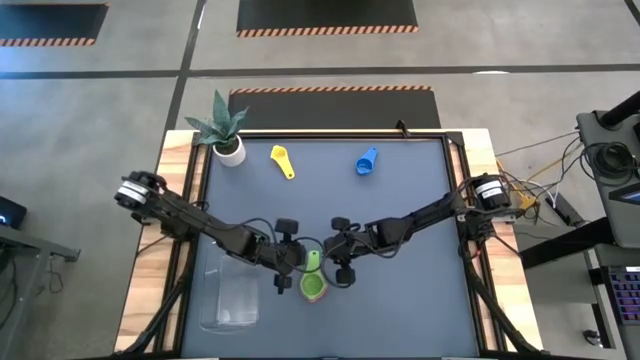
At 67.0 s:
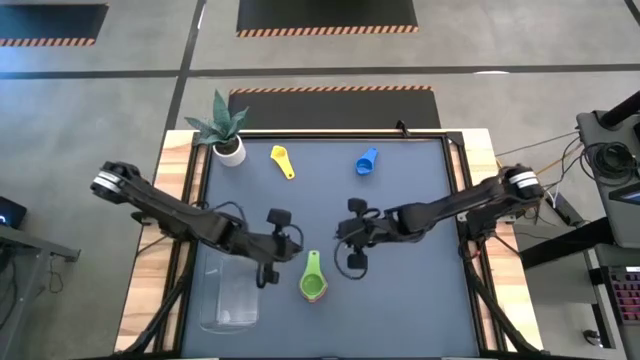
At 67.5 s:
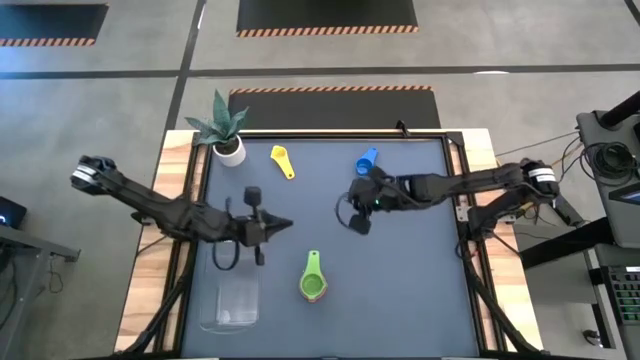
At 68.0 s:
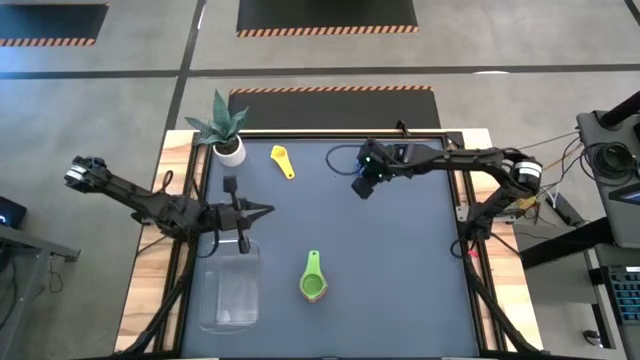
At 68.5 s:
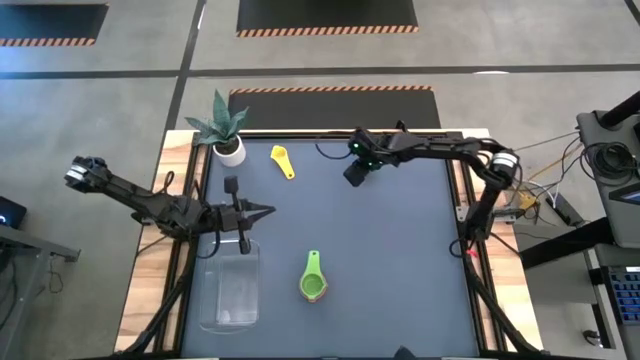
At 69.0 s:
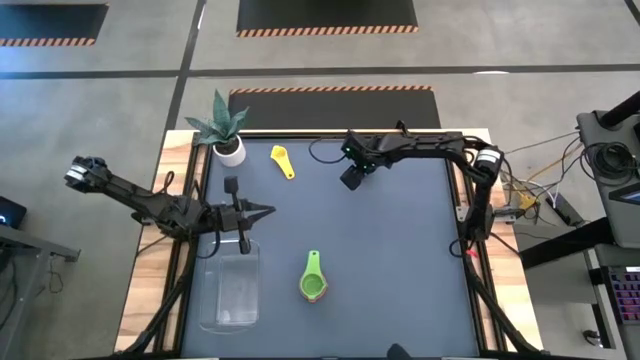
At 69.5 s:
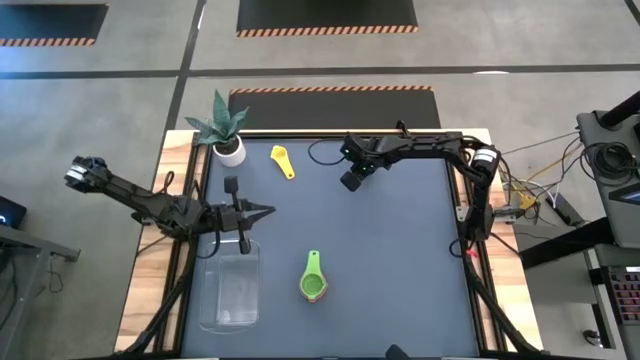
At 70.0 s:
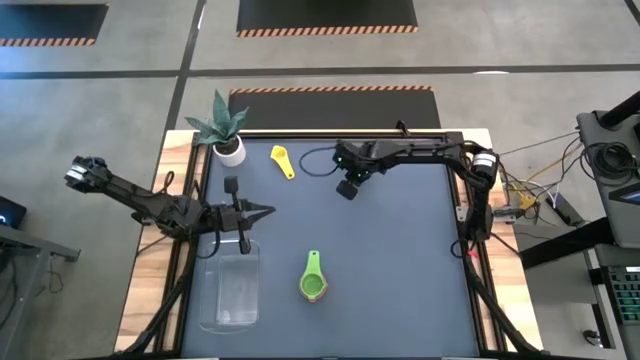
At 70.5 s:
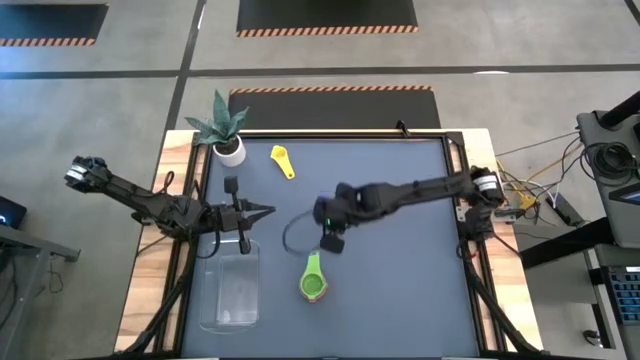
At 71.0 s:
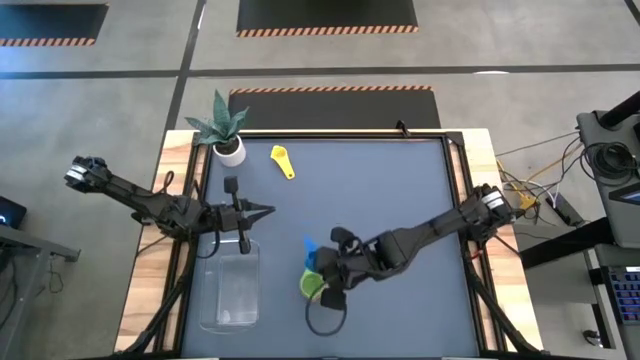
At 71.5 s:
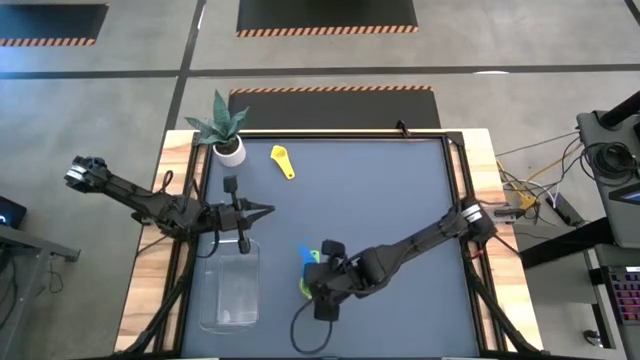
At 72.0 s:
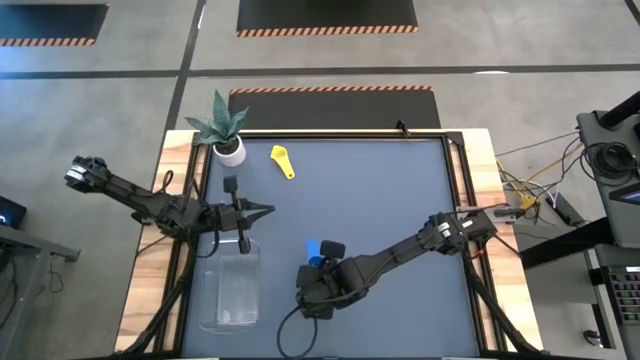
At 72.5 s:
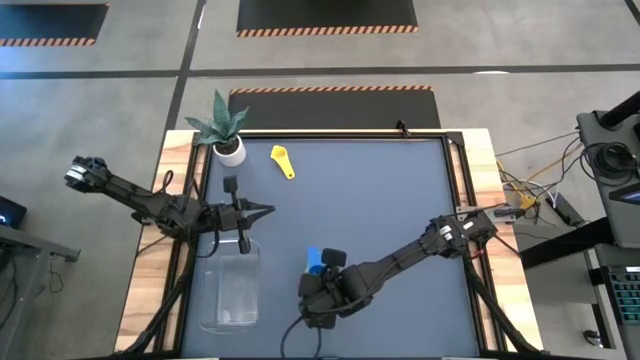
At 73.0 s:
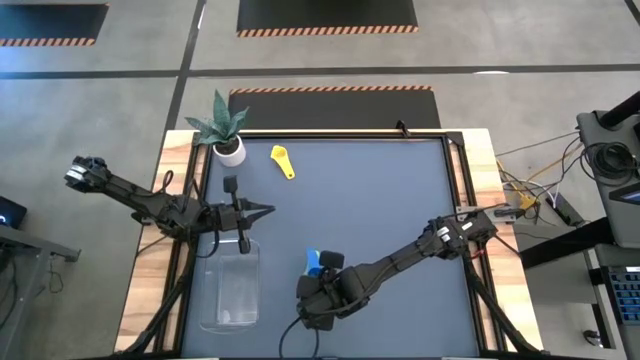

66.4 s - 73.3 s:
Task: Nest measuring cups in basket
Stack the blue measuring cup on top of the green measuring cup
